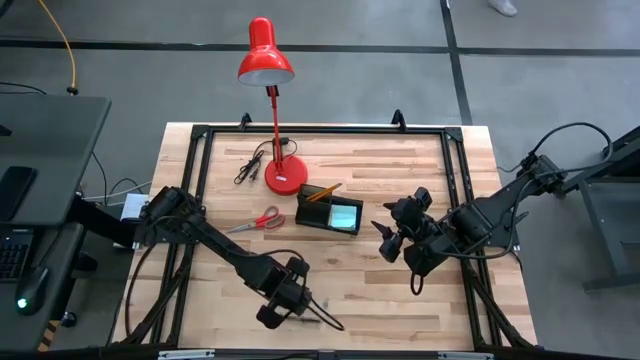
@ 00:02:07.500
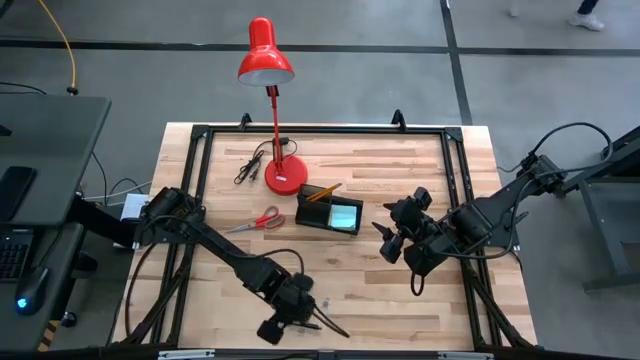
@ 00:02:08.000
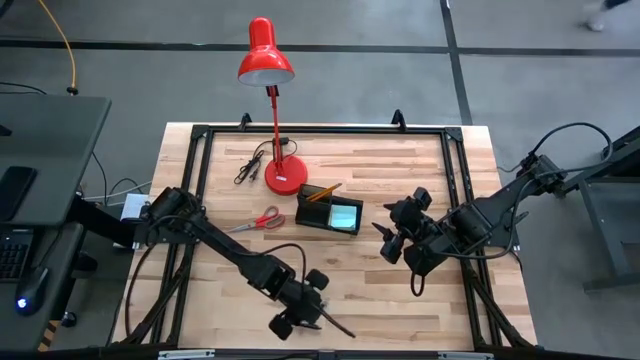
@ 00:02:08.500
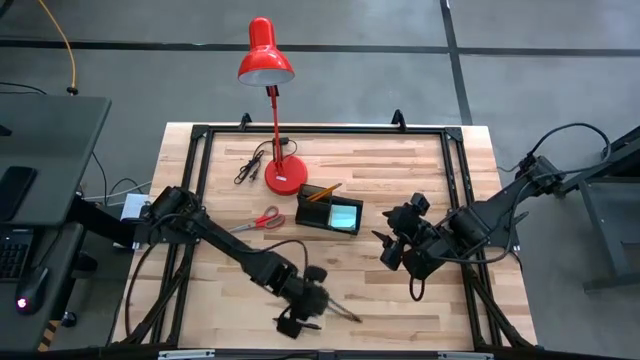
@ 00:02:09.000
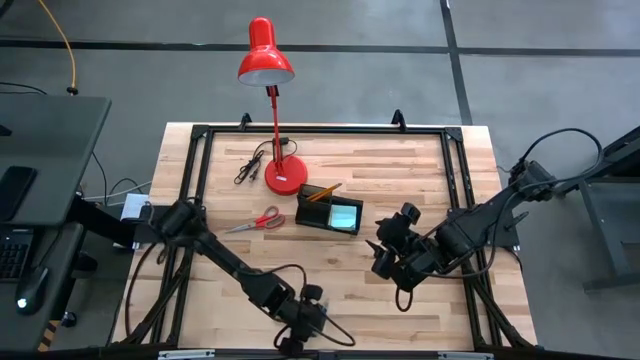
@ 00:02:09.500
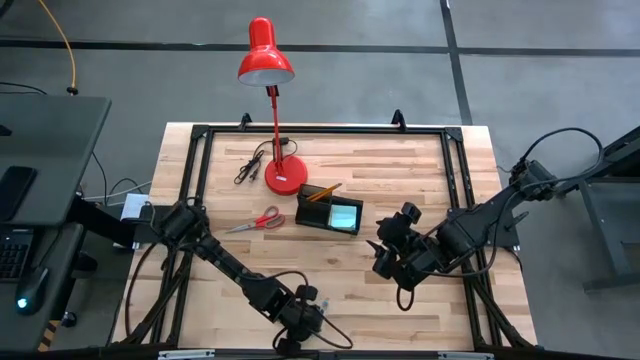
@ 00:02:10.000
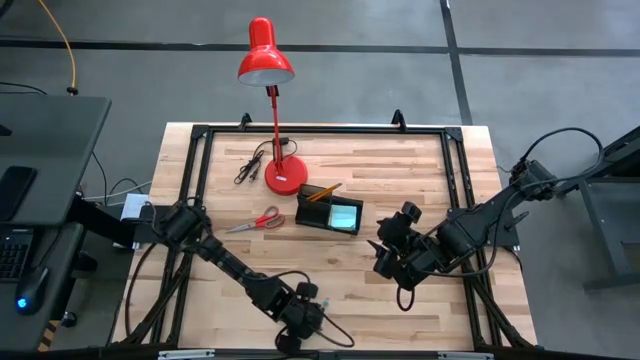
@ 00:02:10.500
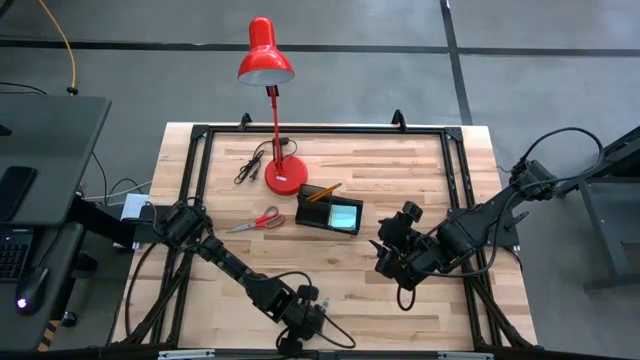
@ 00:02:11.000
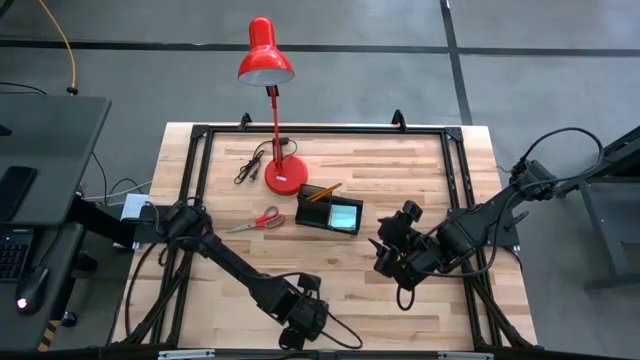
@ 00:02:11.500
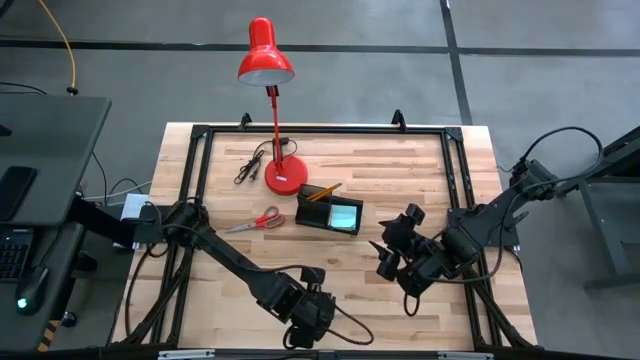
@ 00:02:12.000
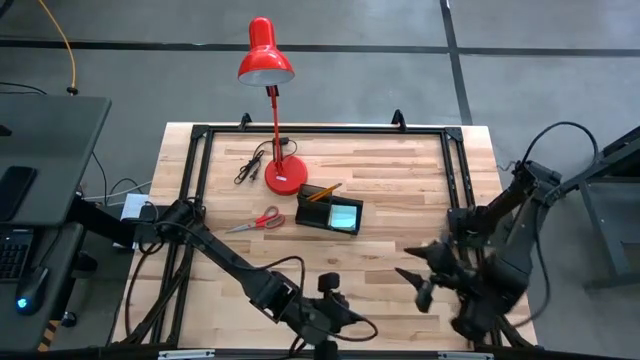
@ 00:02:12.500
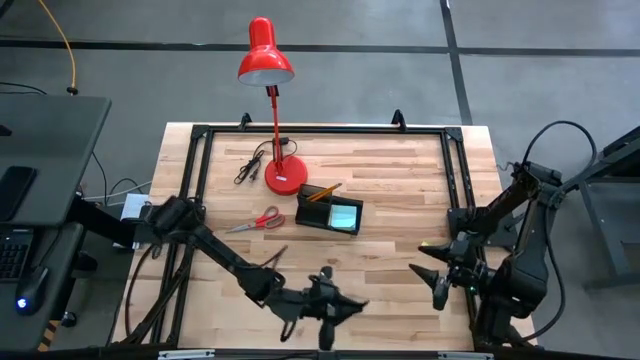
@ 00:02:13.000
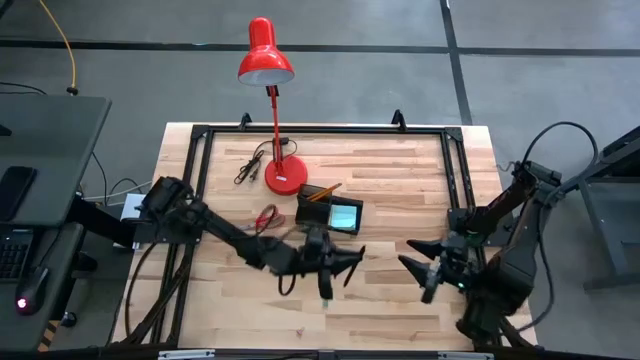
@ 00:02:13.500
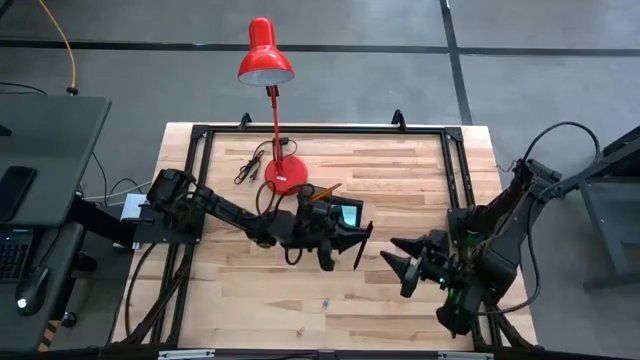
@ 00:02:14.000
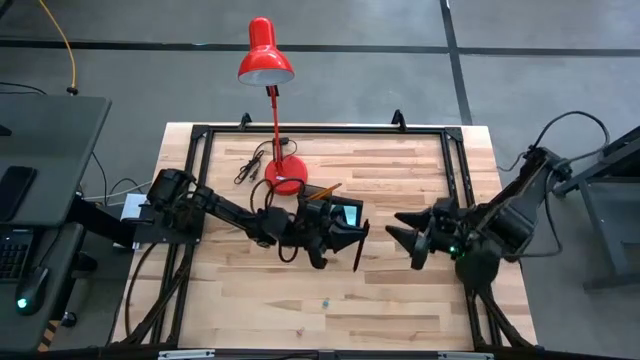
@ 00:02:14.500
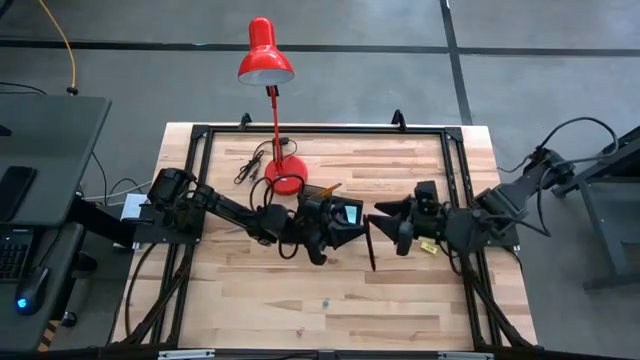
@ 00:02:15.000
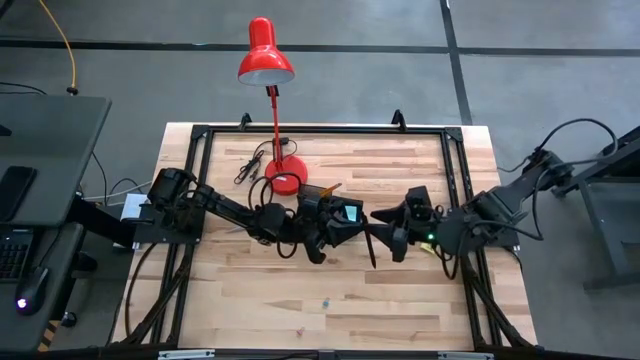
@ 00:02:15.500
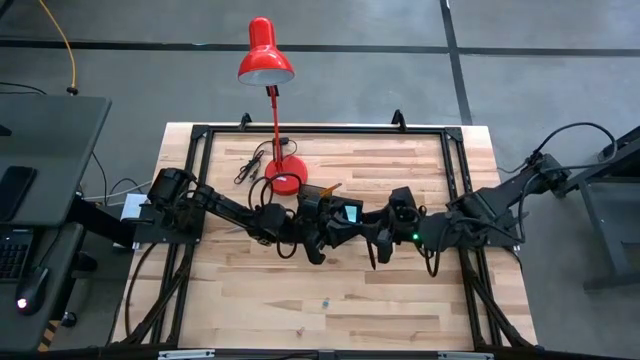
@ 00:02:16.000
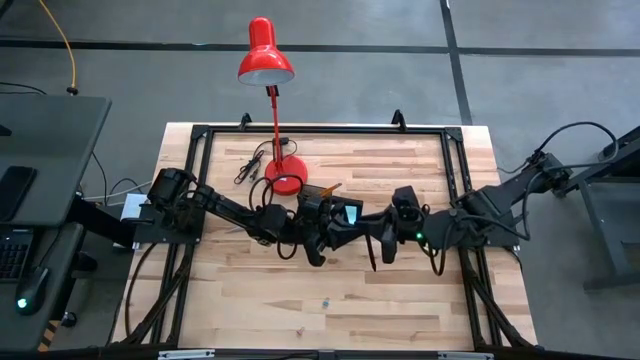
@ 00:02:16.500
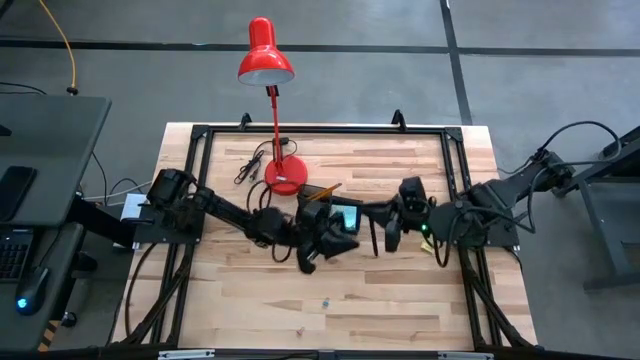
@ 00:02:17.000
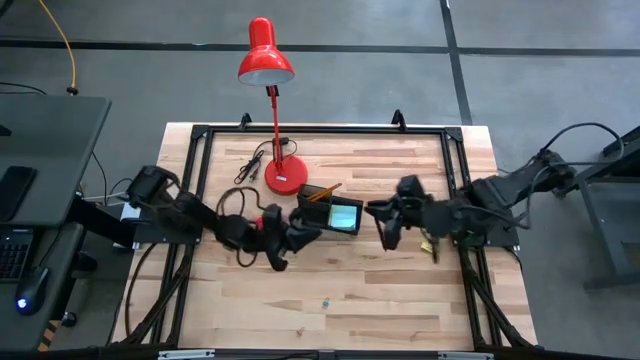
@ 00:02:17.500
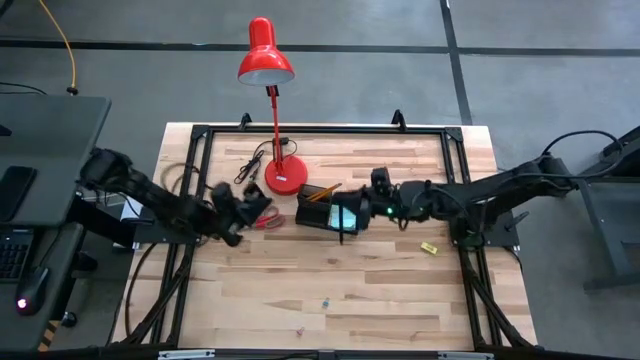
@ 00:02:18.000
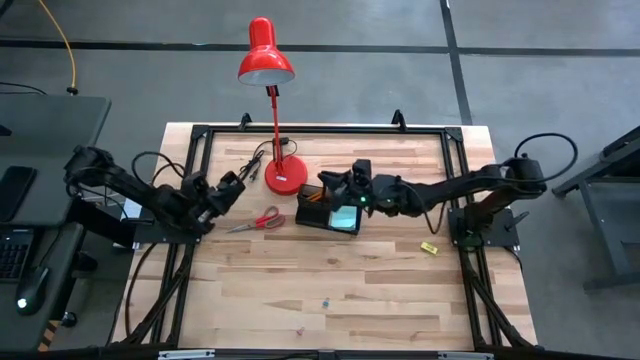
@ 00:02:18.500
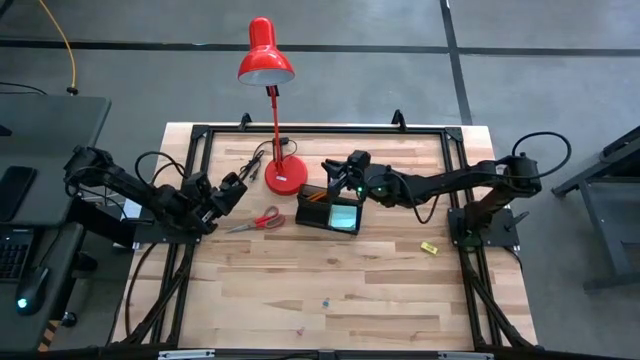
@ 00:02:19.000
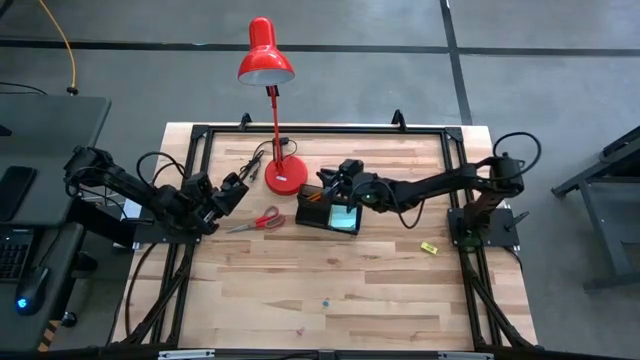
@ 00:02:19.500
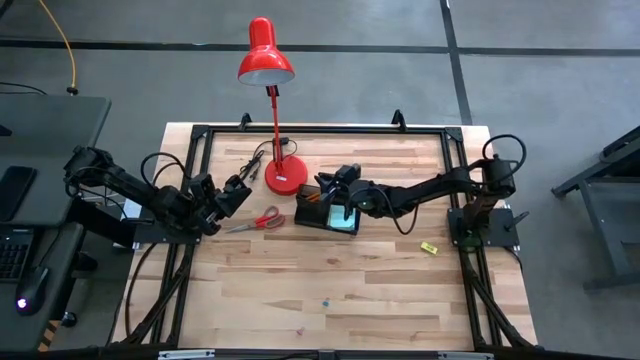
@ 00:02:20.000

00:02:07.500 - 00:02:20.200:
Task: Pick and place office supplies into organizer
Put the black pen into the black desk organizer

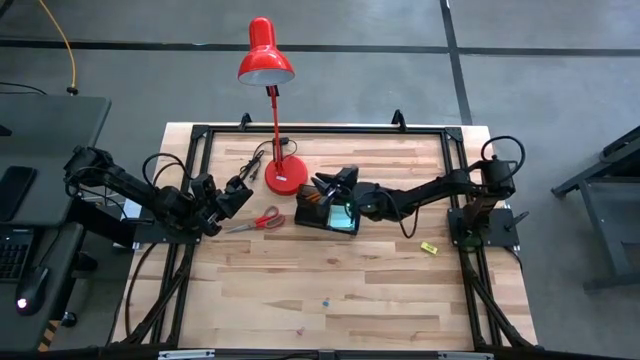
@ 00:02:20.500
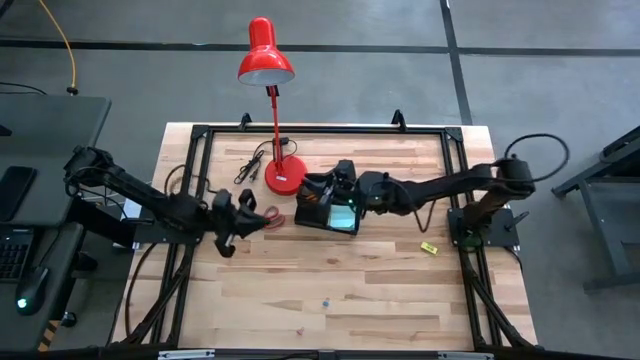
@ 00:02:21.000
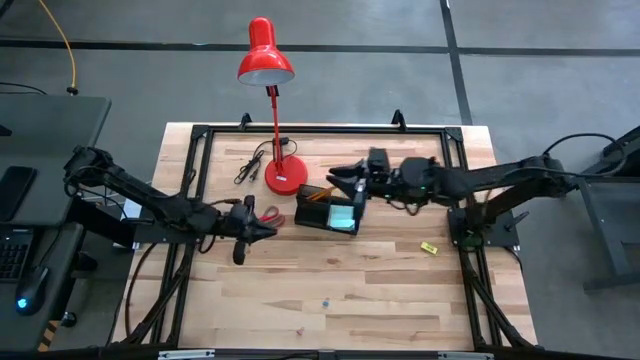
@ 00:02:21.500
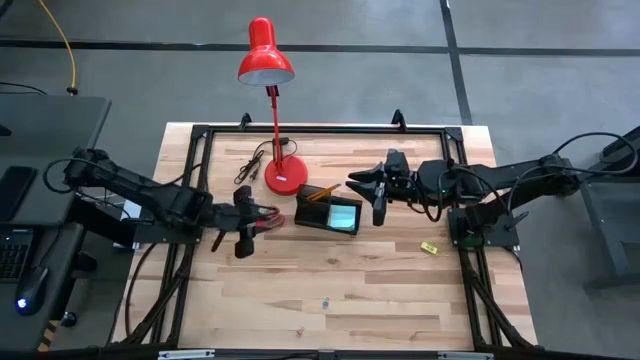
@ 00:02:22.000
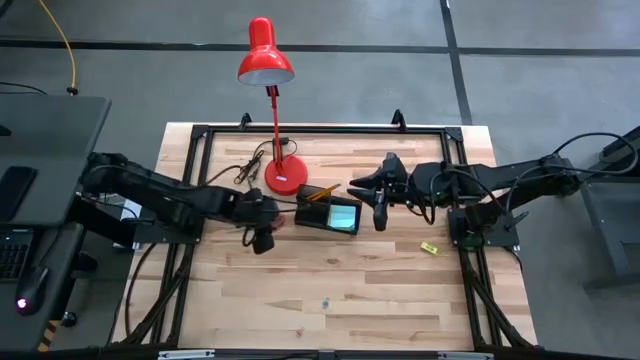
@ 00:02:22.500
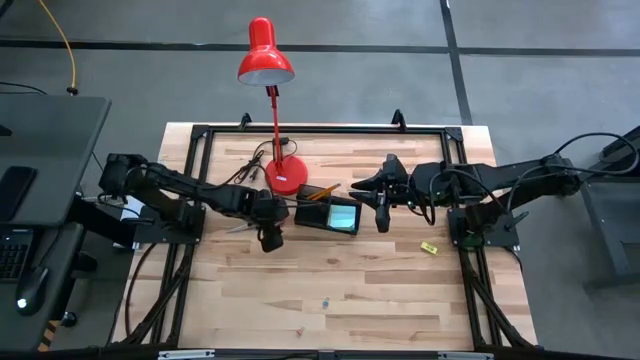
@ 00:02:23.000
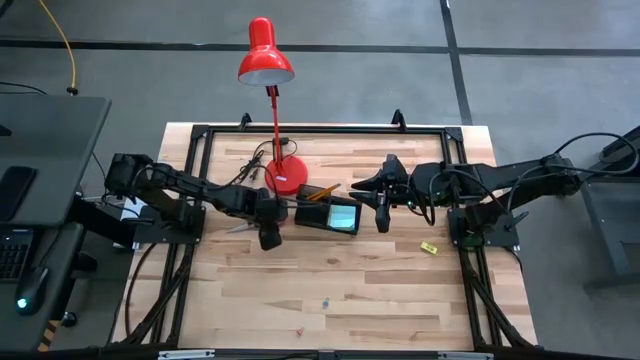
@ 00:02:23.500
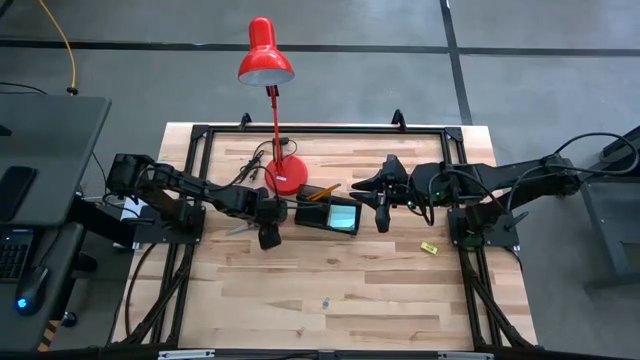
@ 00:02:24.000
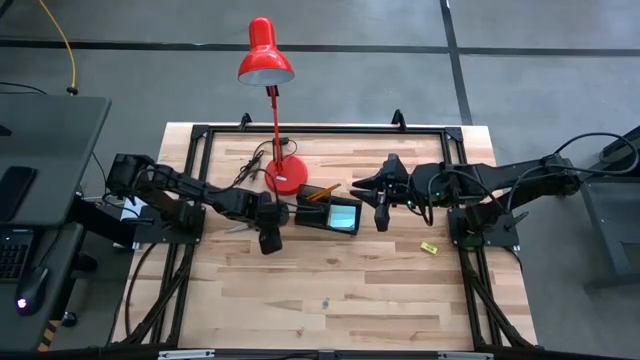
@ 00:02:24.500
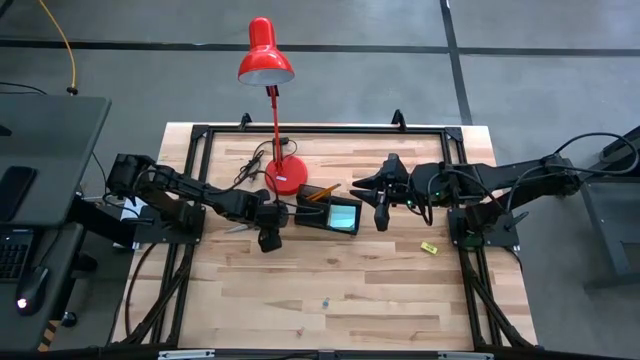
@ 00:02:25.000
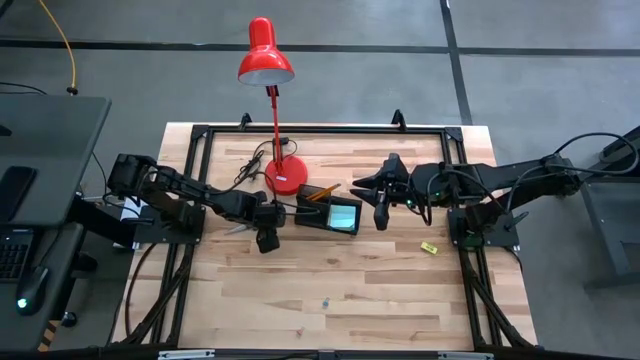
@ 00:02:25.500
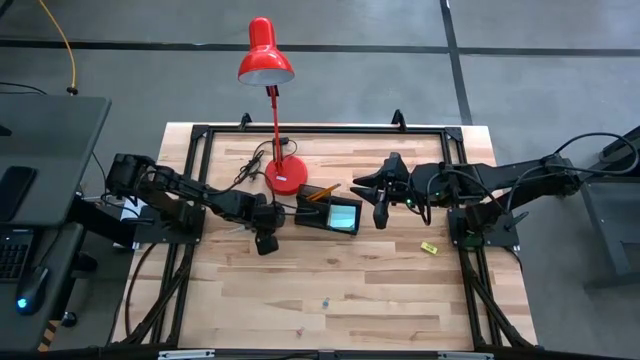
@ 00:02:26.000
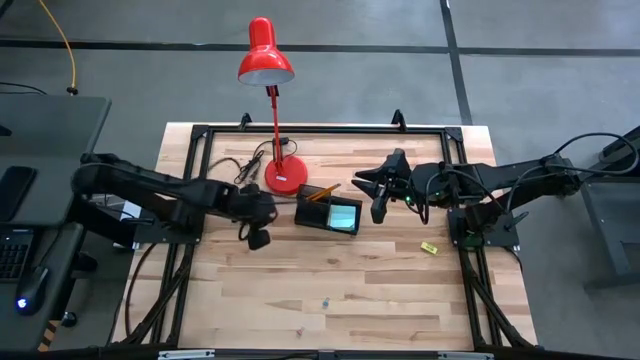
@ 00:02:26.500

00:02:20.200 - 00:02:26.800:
Put the red scissors into the black desk organizer
